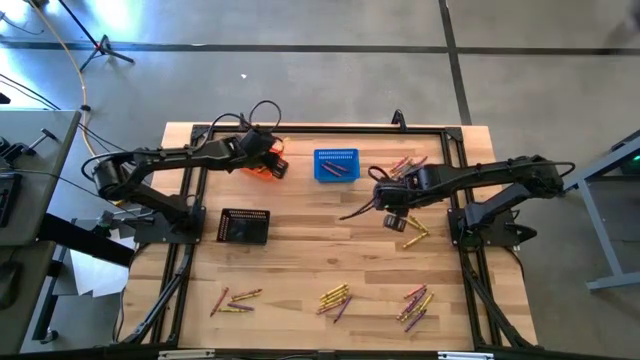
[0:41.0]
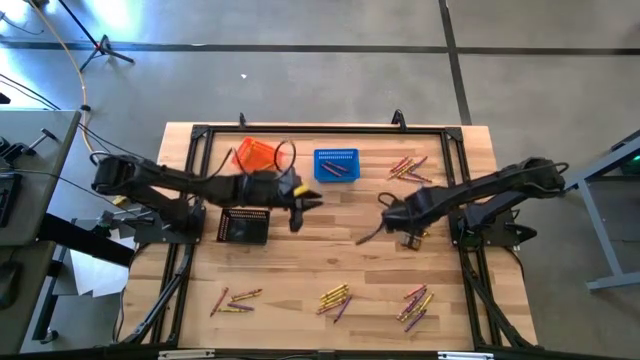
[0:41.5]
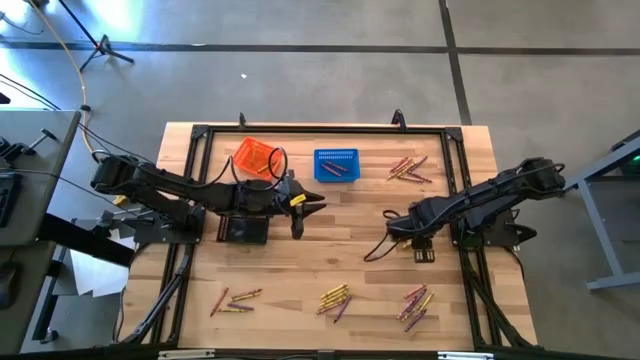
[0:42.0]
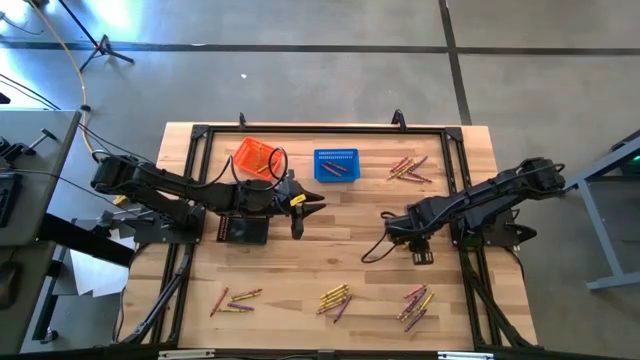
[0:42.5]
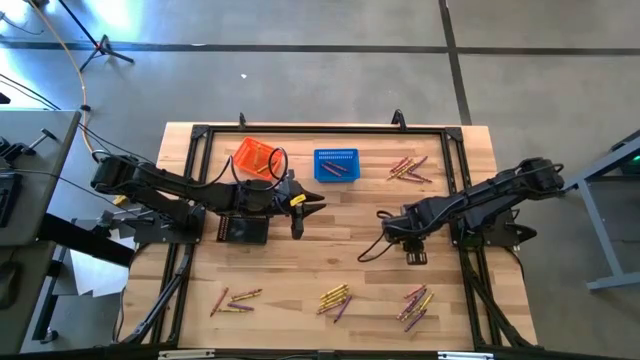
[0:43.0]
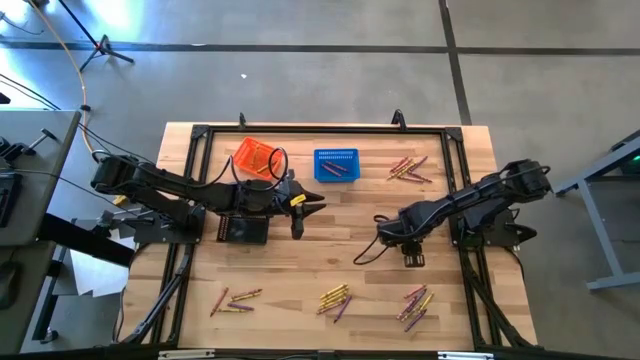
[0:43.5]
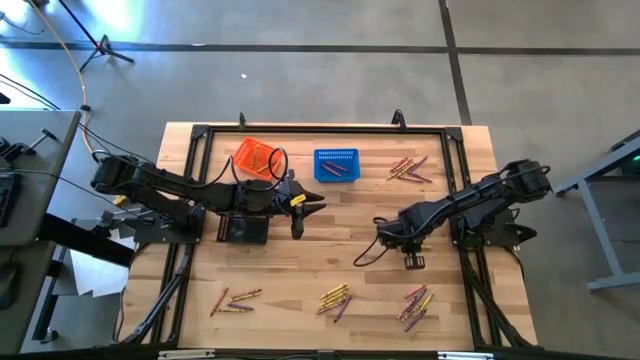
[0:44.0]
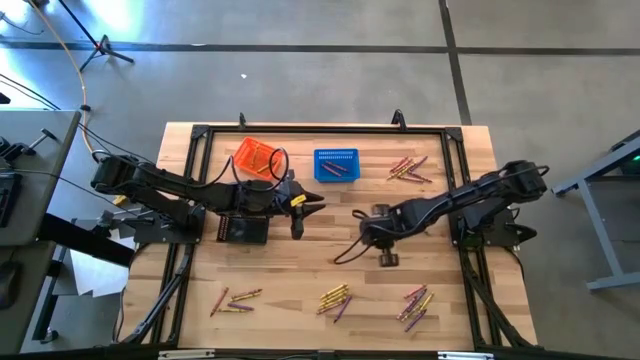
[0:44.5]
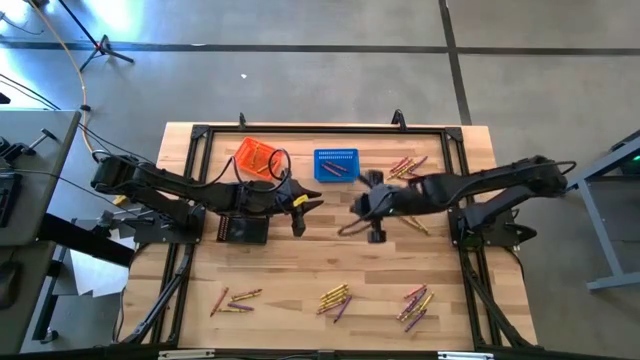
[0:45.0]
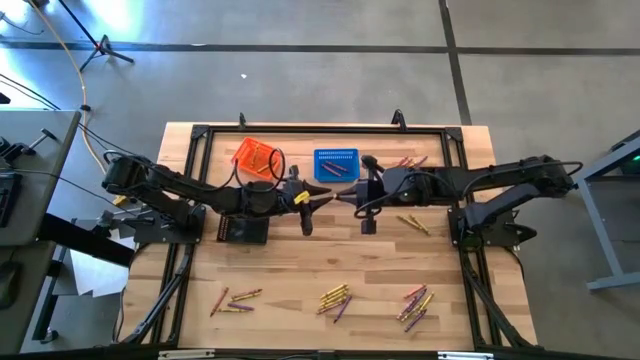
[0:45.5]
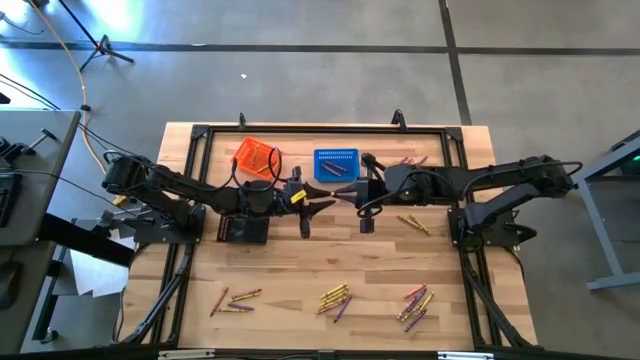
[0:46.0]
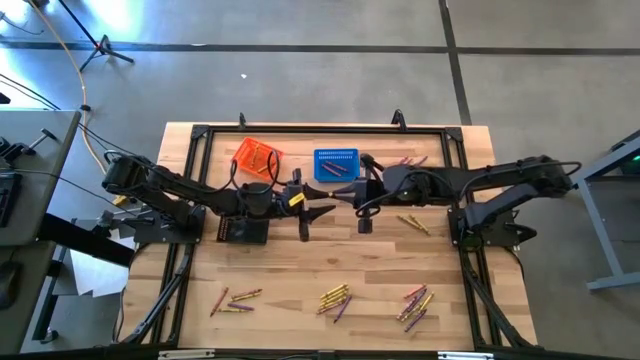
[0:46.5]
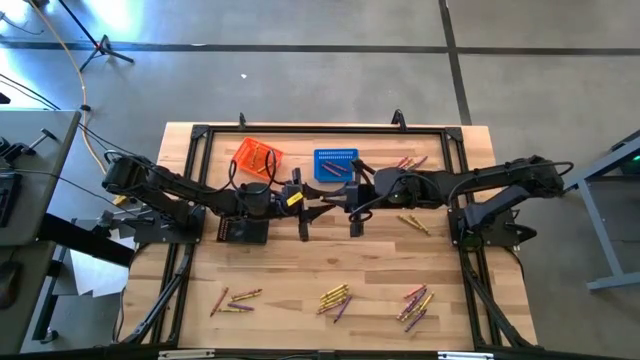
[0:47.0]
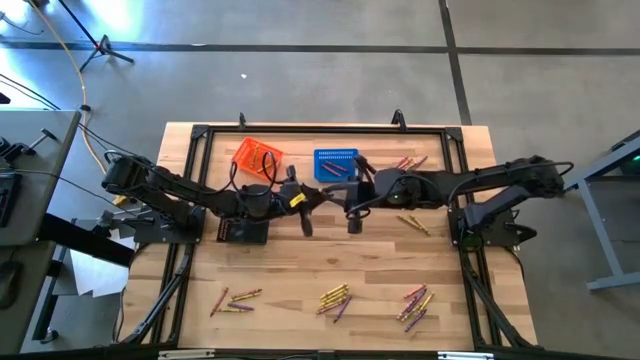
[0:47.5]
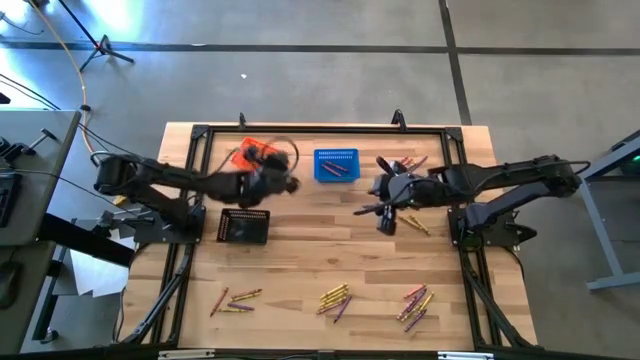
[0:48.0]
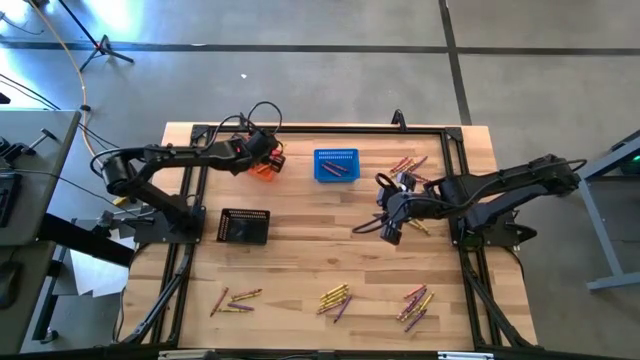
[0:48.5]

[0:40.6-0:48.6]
Task: Sort crayons
Put the yellow crayon into the orange bin

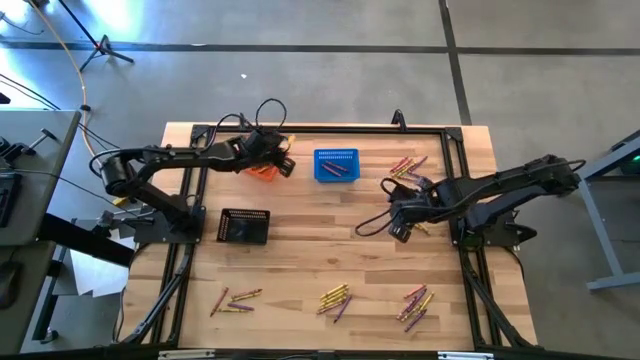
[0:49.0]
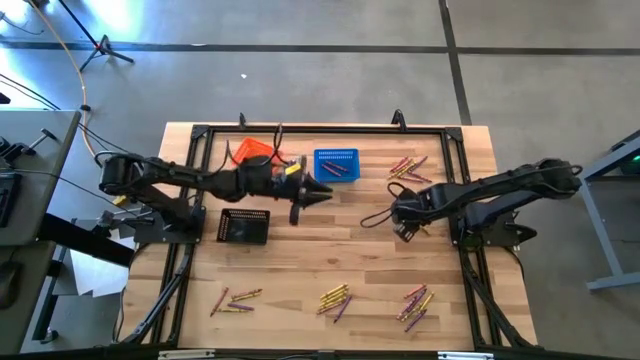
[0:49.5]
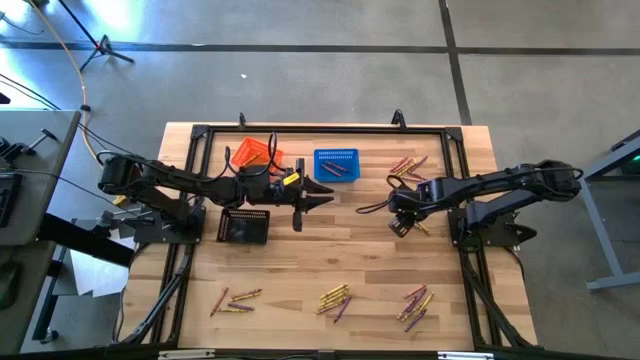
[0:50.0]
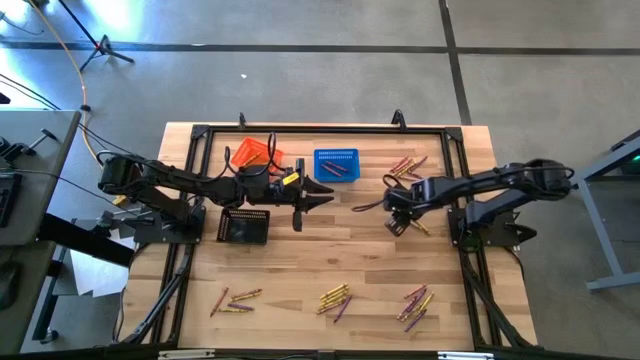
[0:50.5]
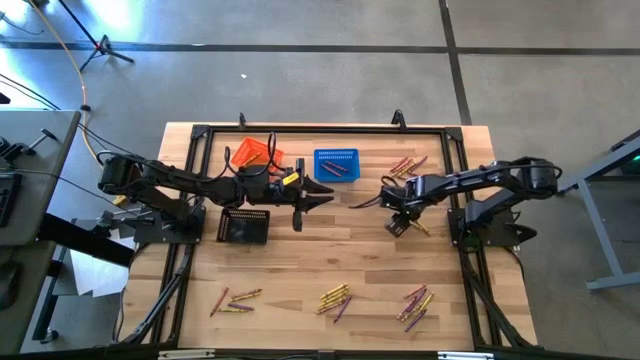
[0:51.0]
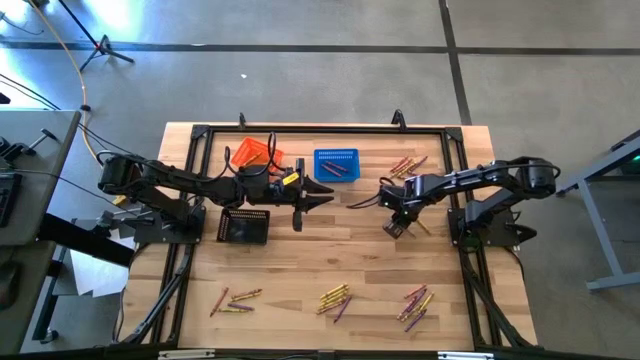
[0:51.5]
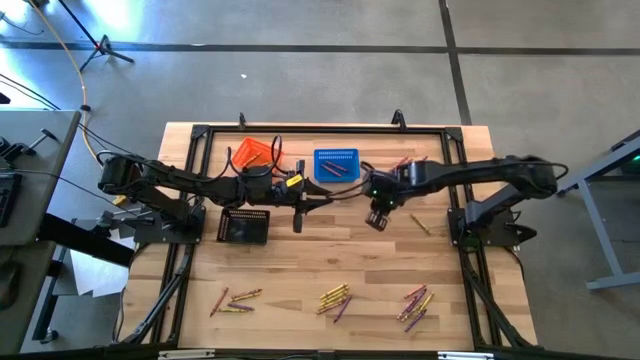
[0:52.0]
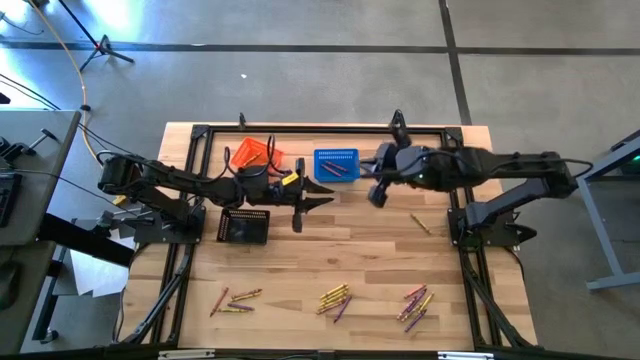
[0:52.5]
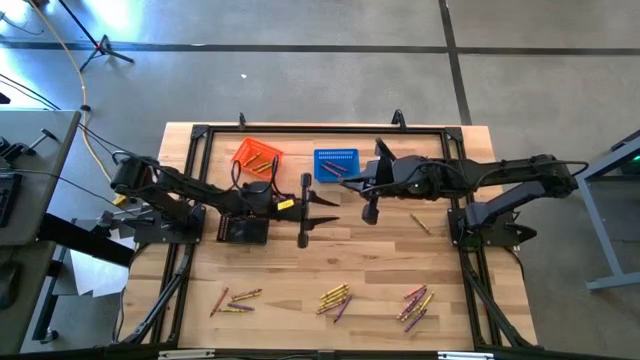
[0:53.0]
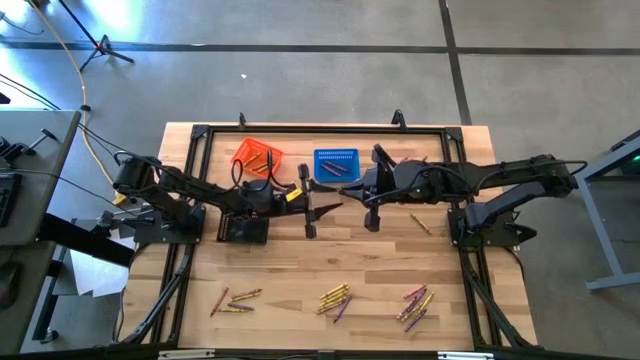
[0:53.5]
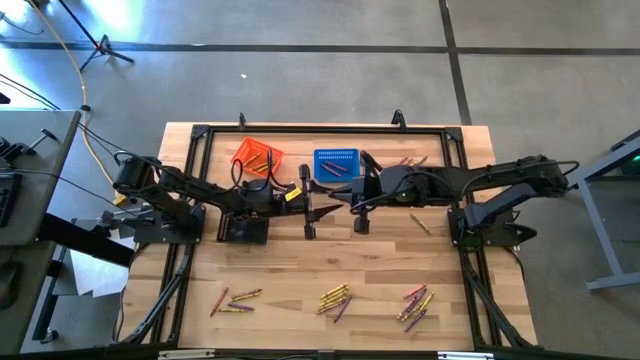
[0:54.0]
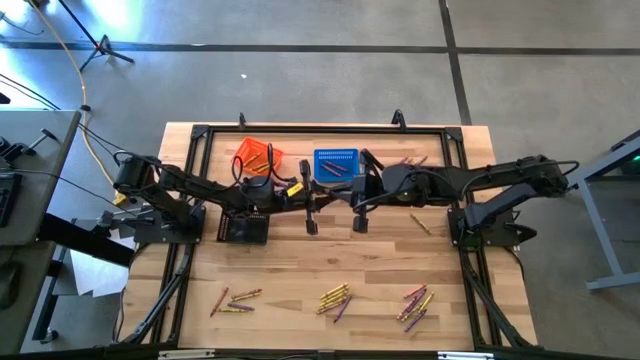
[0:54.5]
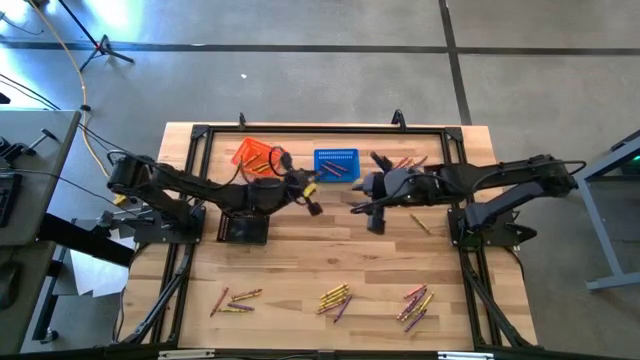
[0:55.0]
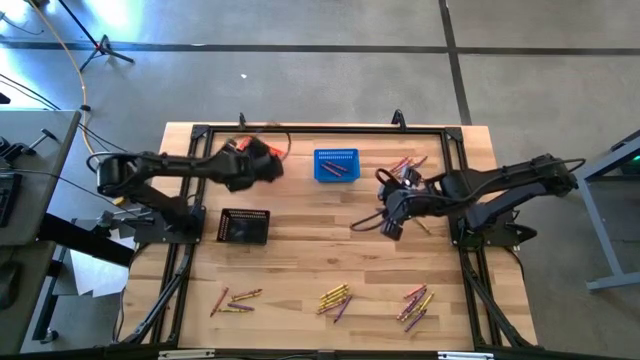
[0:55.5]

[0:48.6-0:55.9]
Put the yellow crayon into the orange bin

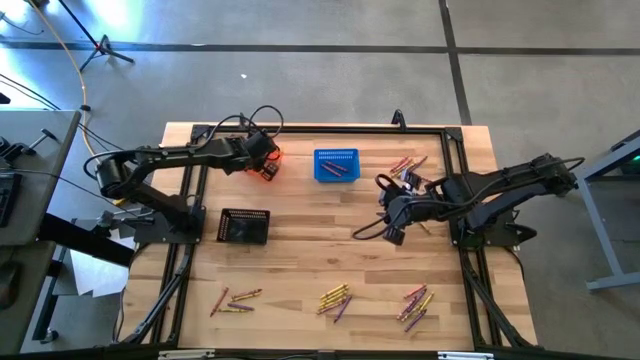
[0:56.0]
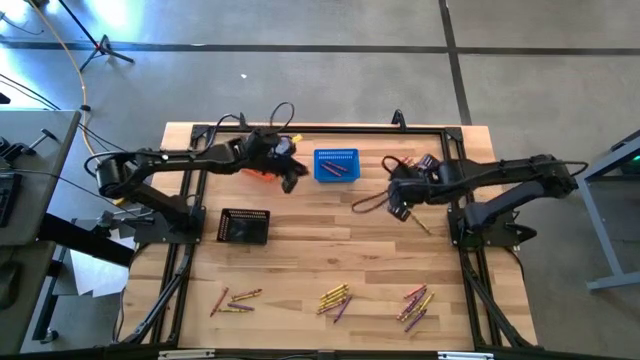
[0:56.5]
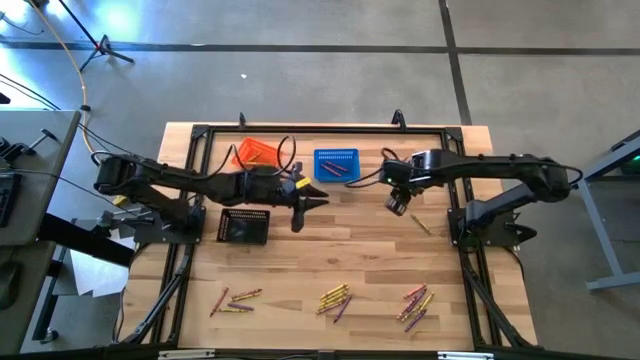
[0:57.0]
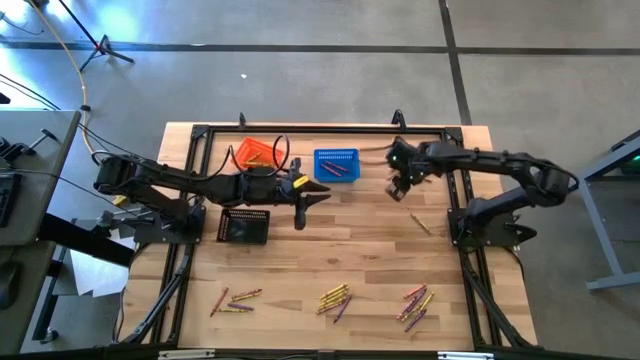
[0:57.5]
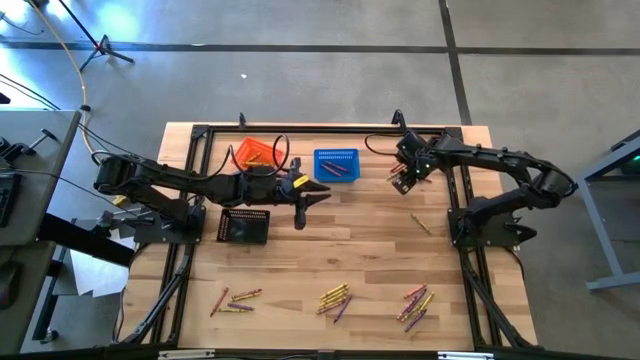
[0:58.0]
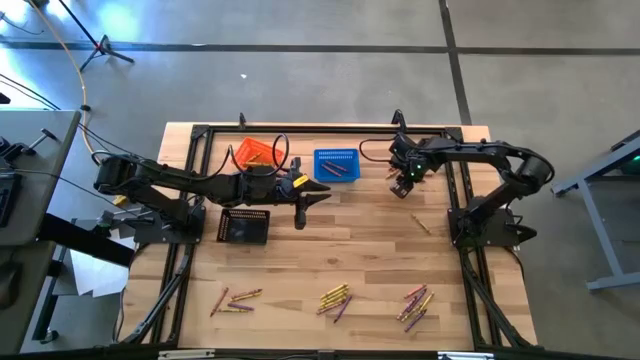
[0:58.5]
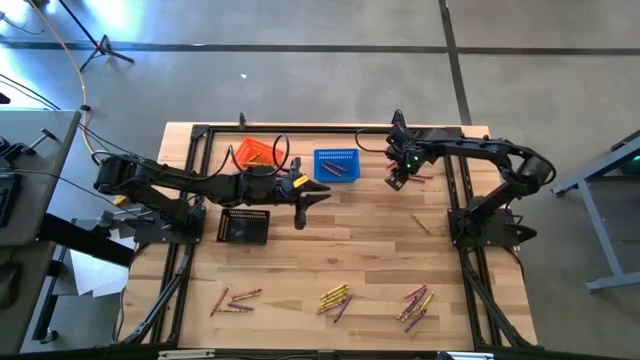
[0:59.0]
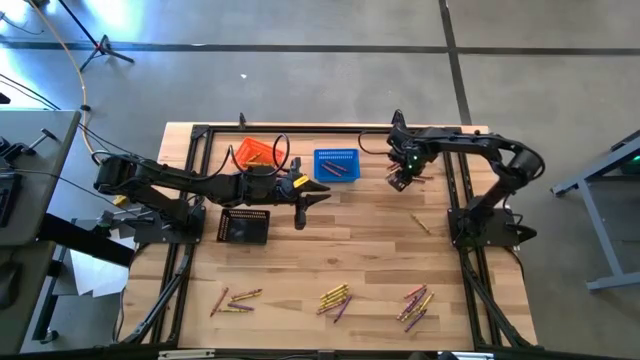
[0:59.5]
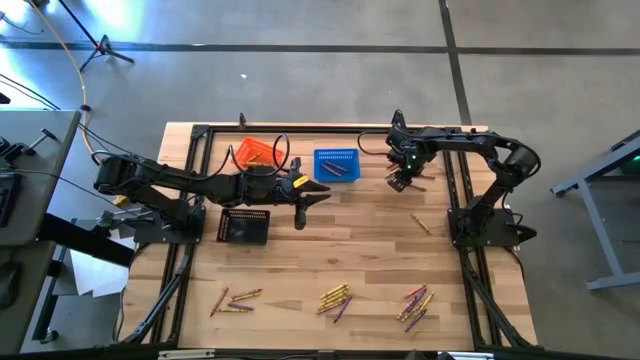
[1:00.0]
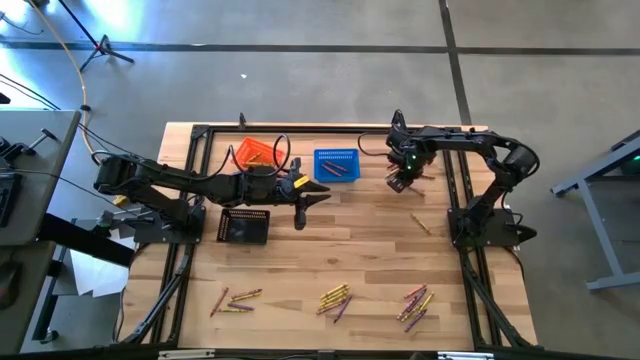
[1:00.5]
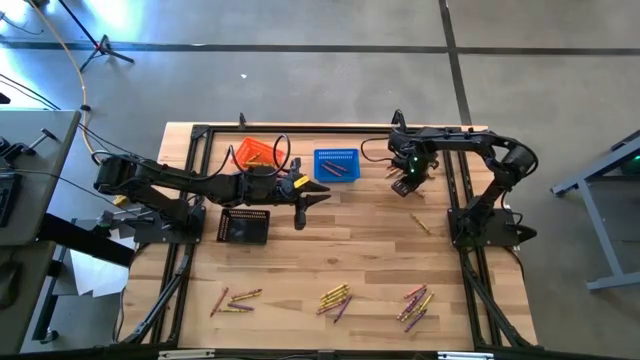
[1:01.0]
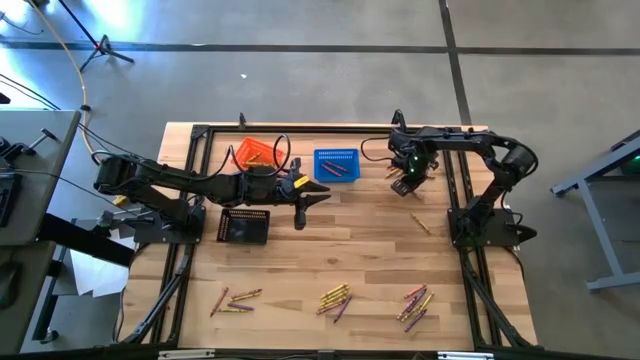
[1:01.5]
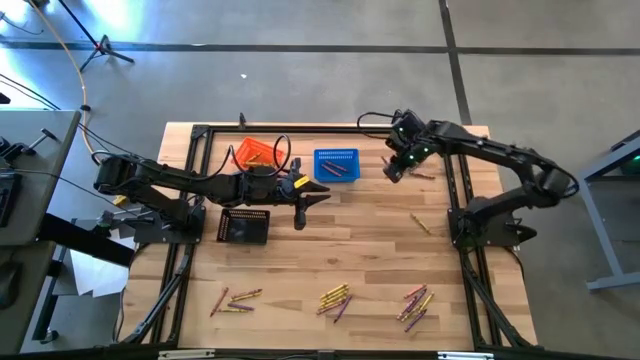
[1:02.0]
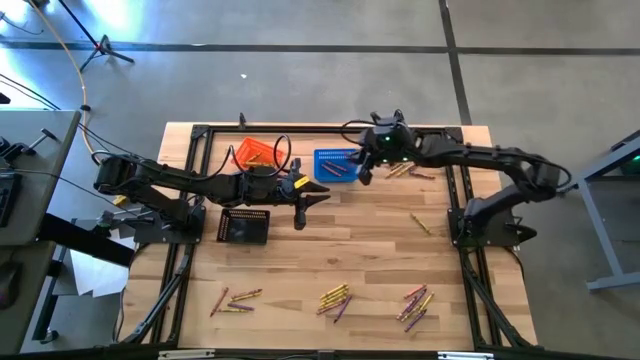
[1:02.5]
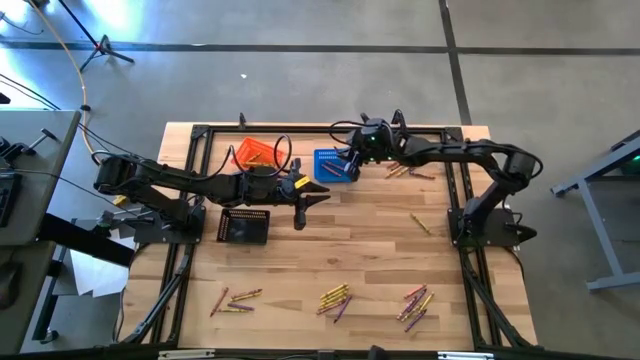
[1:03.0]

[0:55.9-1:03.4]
Put the red crayon into the blue bin
